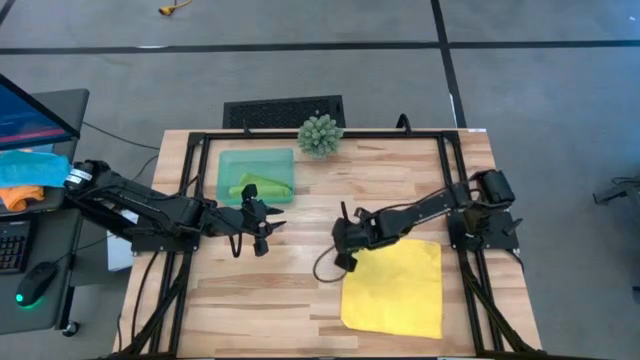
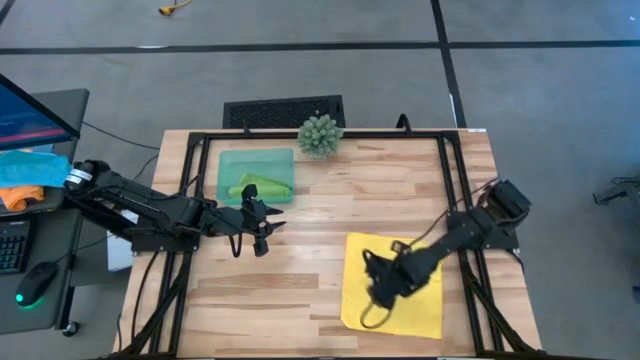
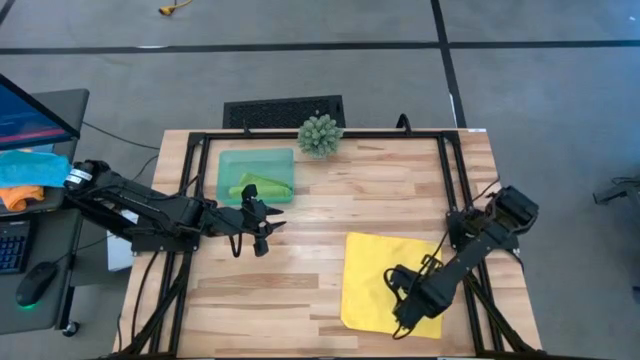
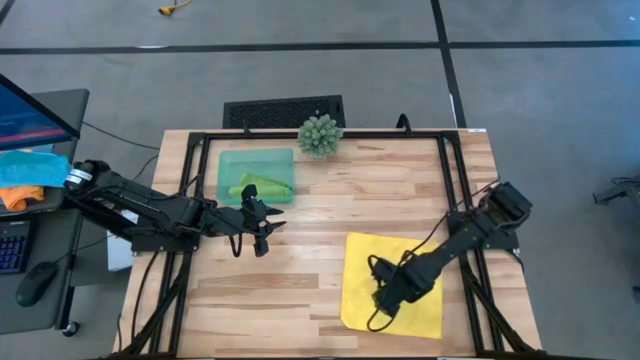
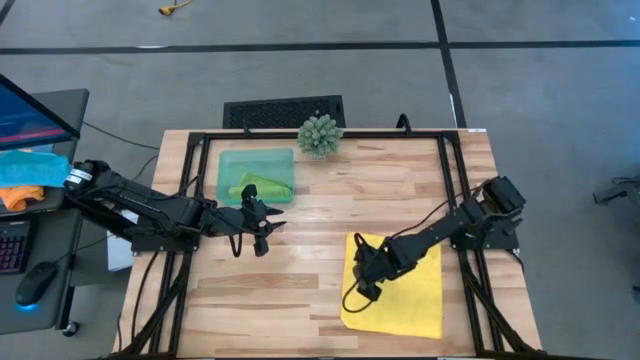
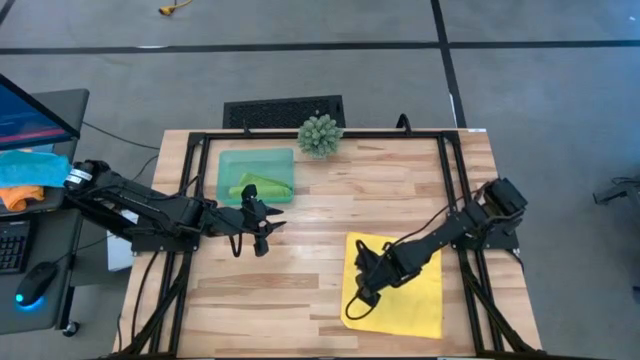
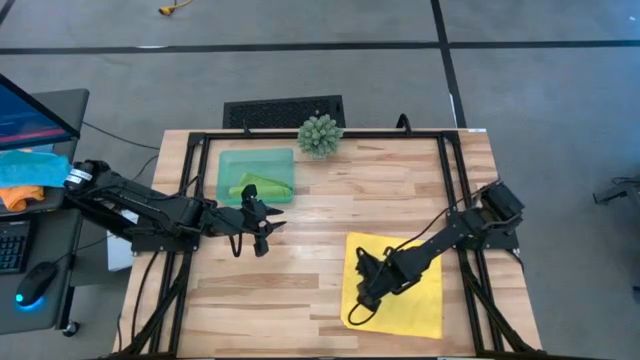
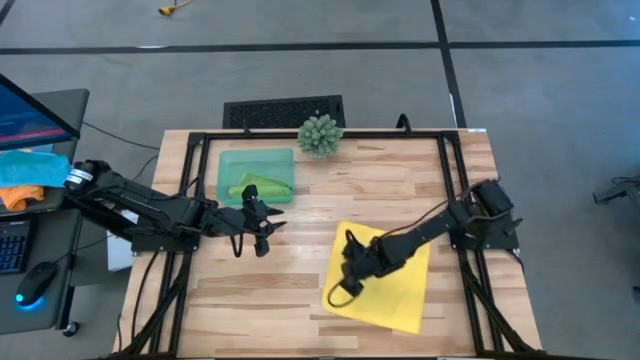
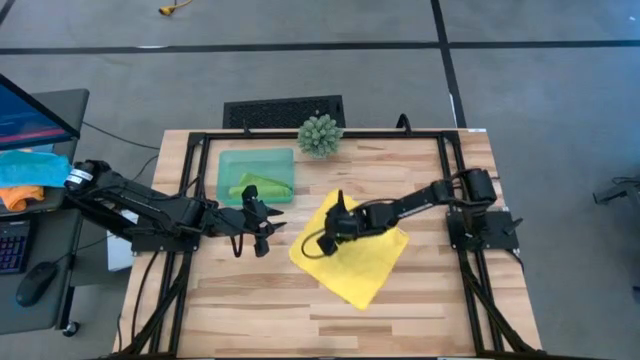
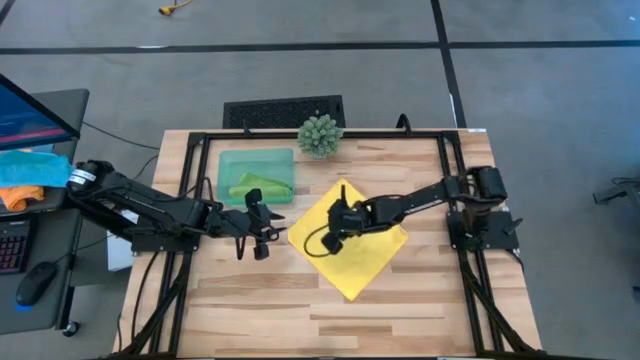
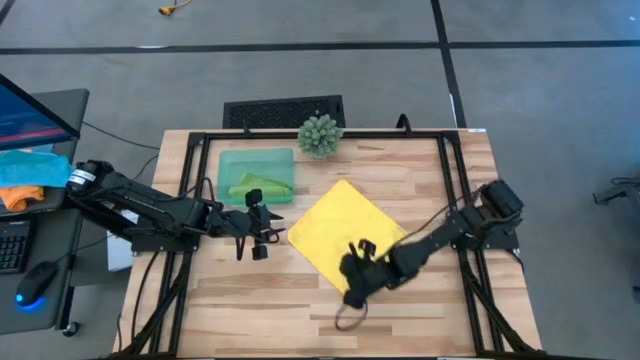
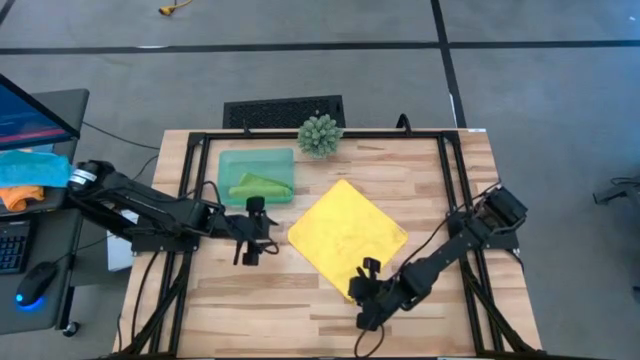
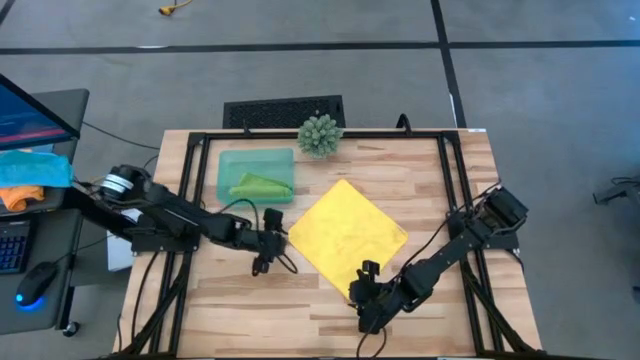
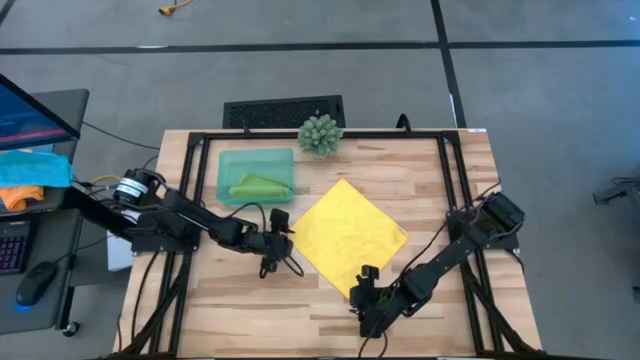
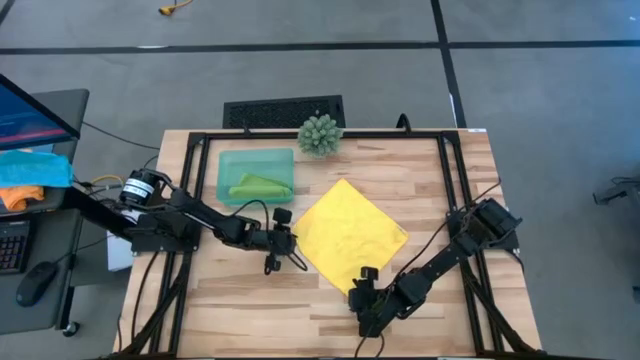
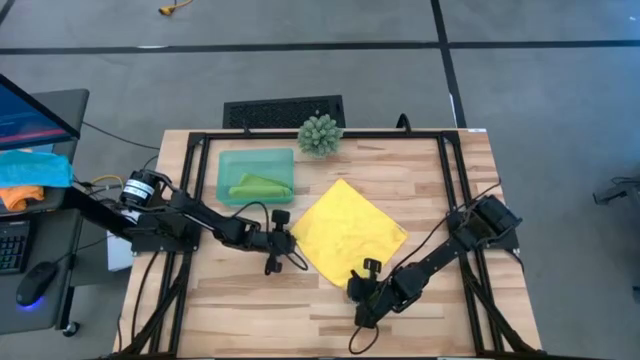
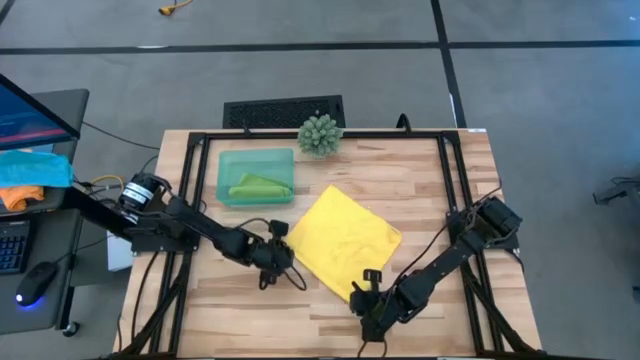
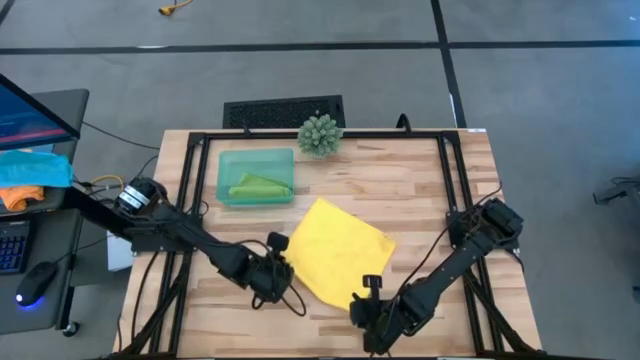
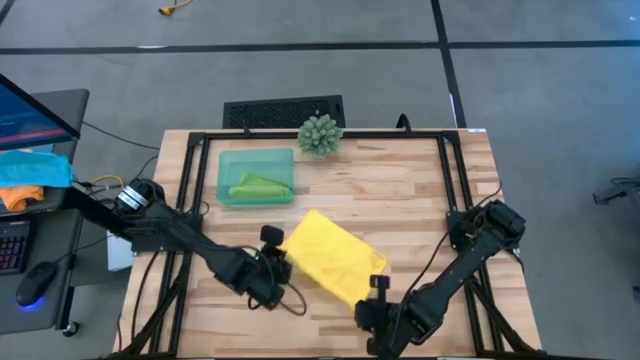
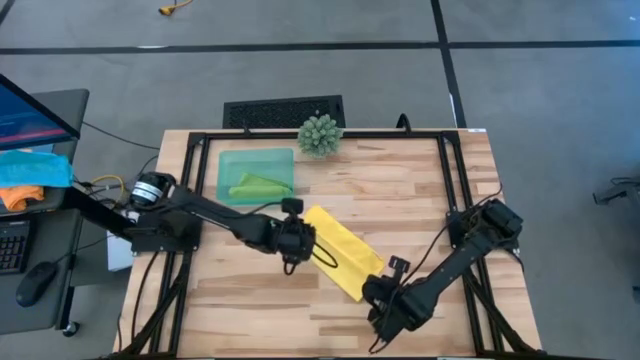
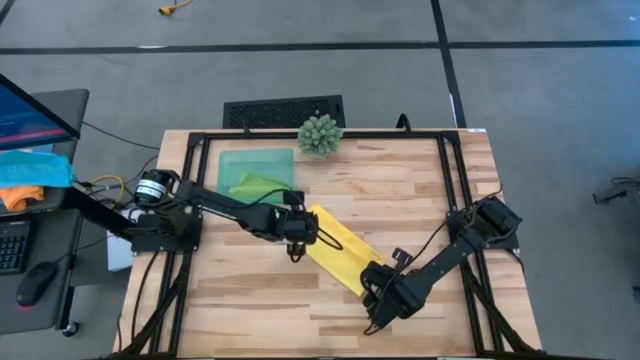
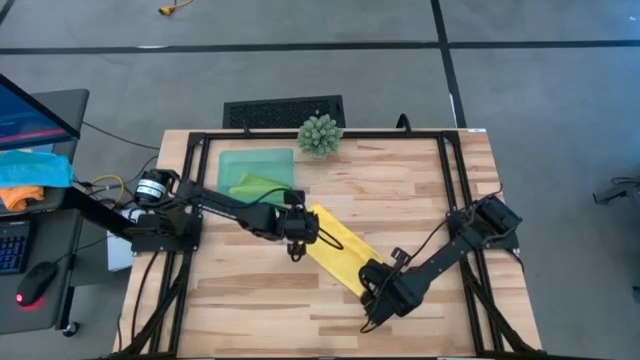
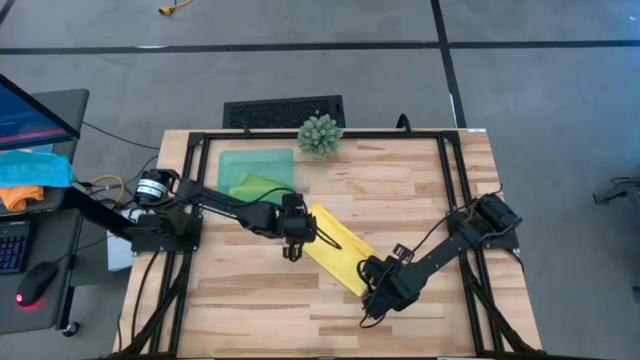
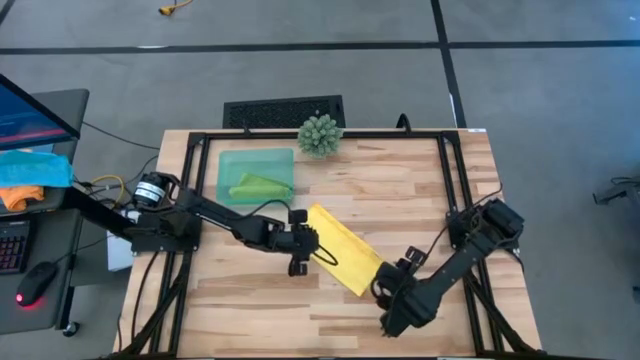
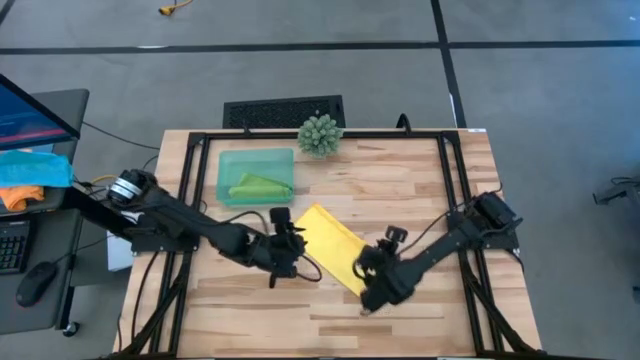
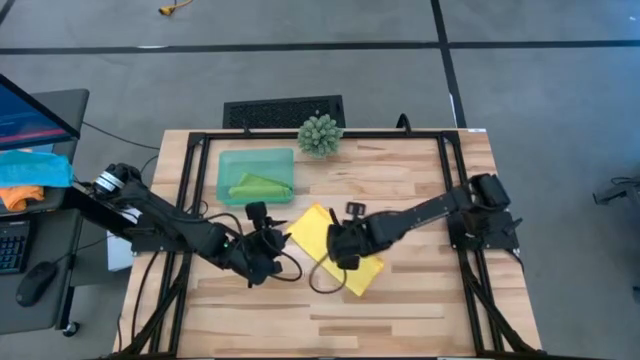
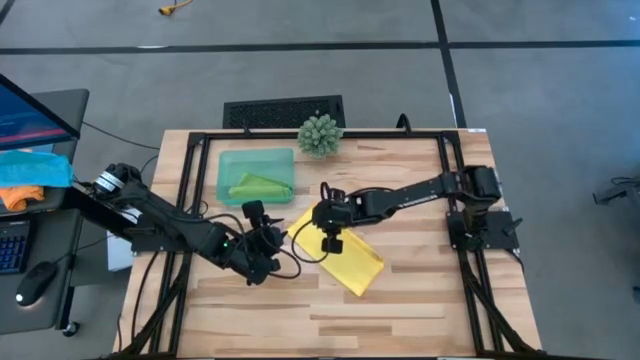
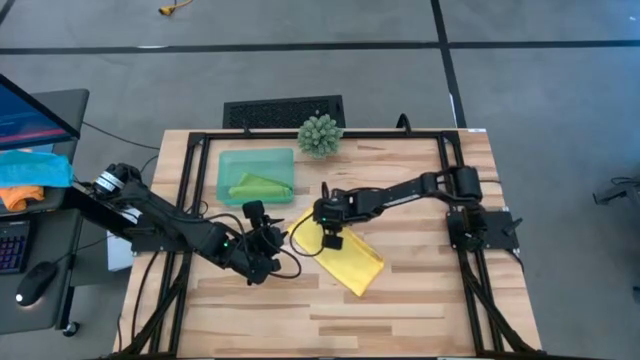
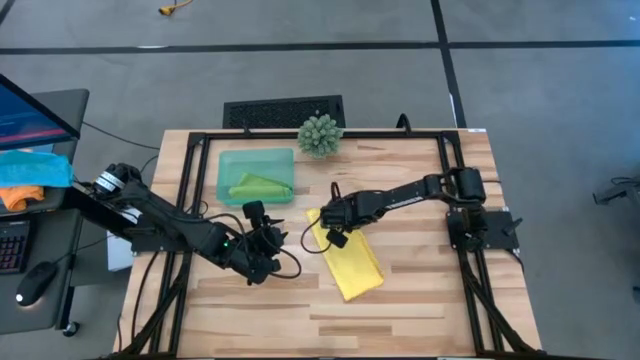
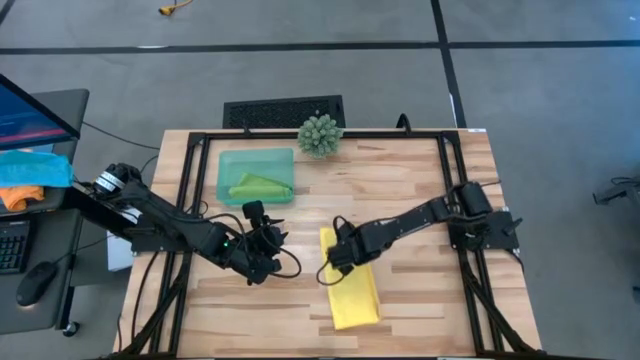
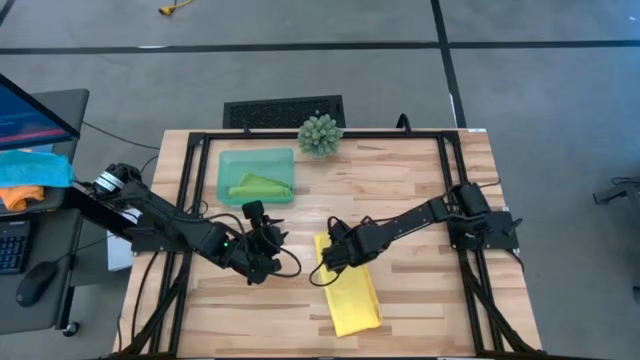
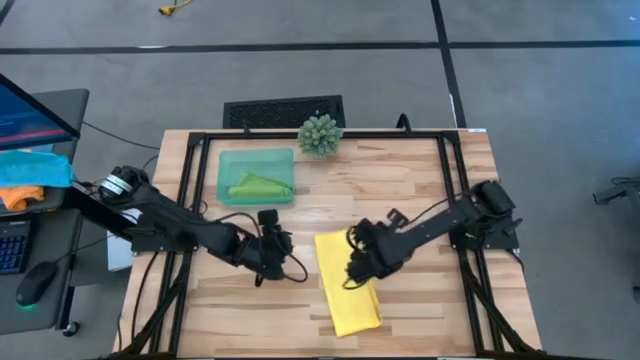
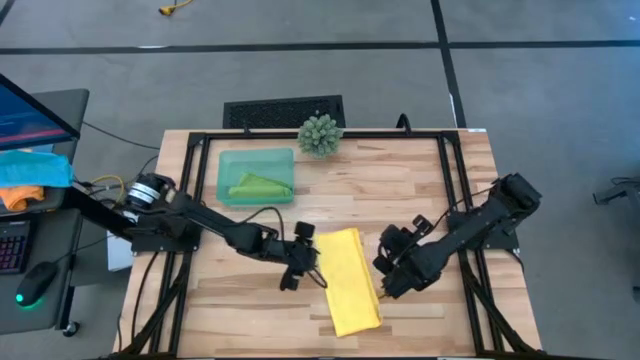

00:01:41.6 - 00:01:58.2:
Task: Roll microfiber towels into tight, uniform cylinder then place into a basket
Fold the yellow towel

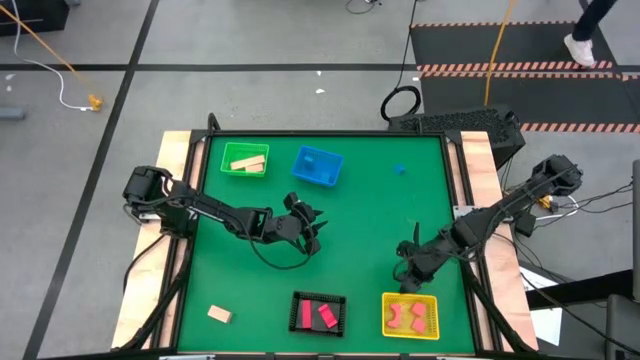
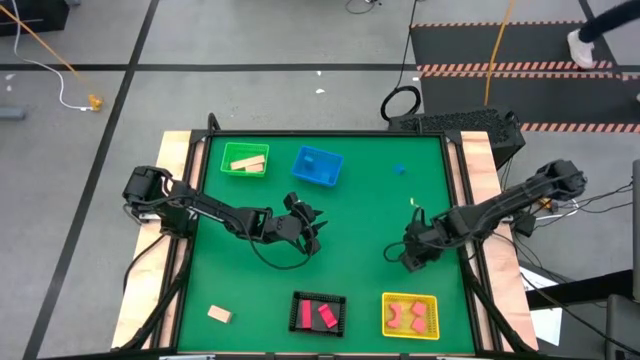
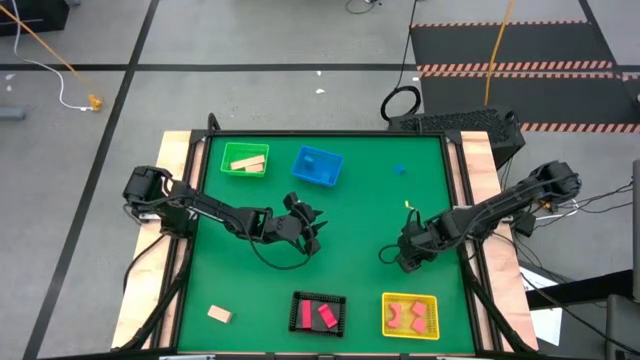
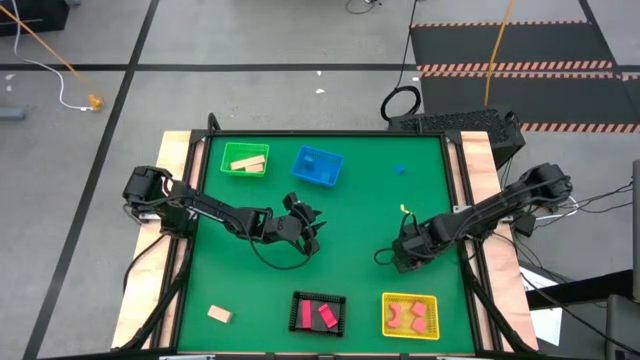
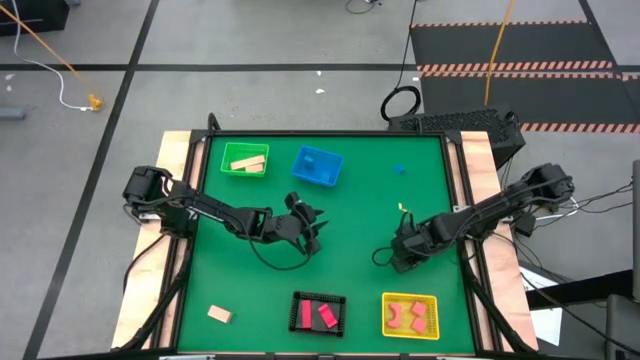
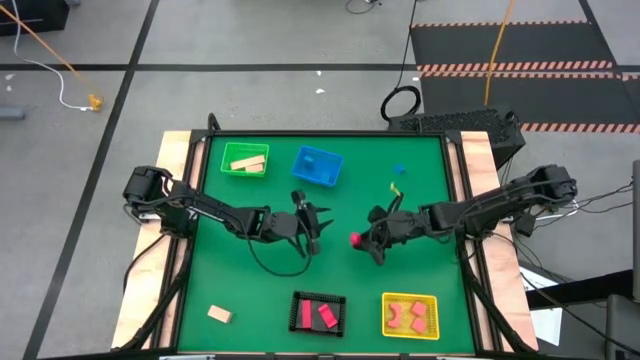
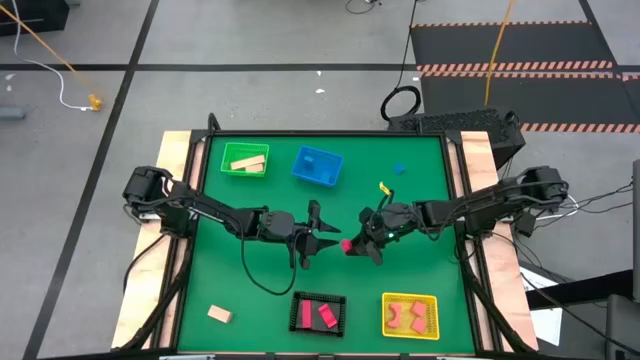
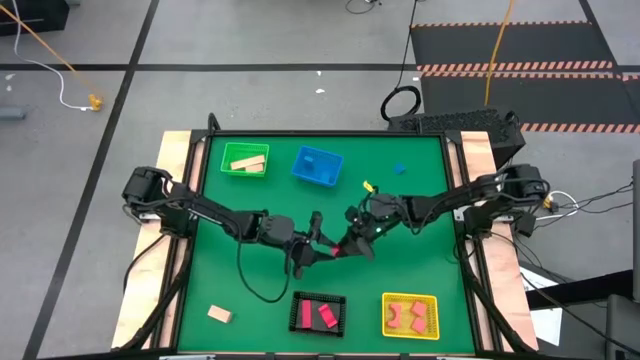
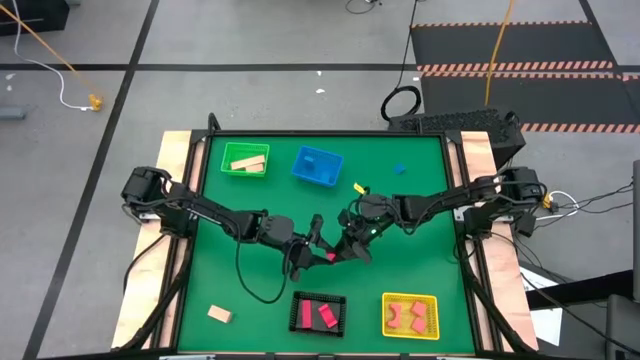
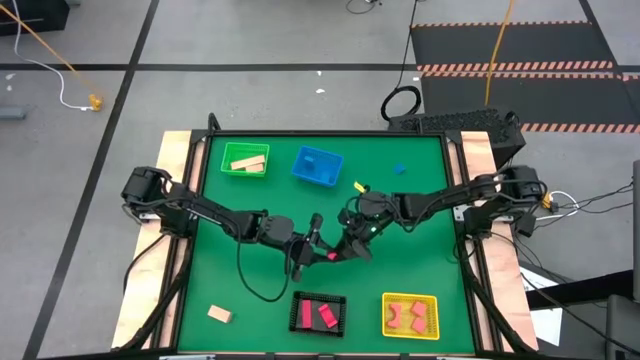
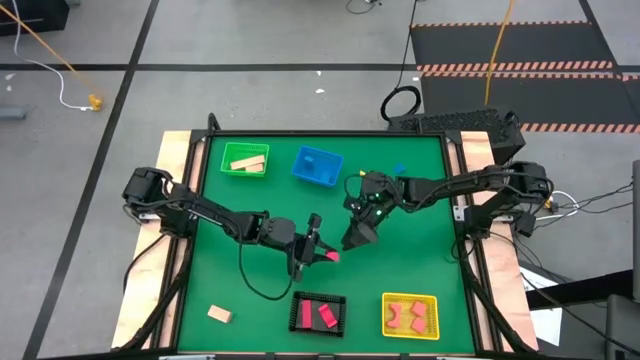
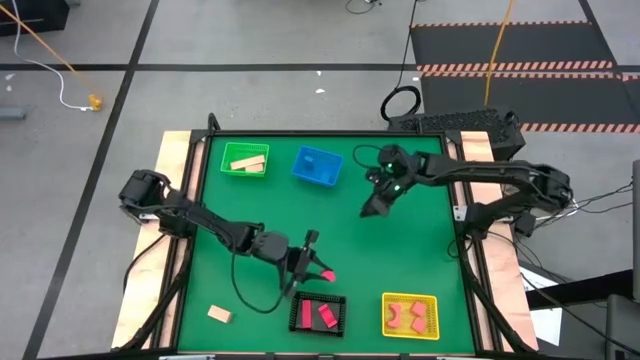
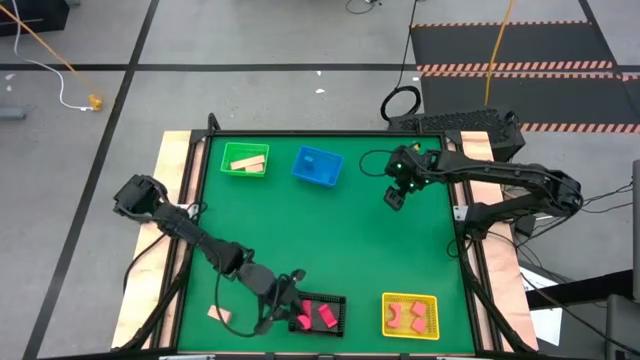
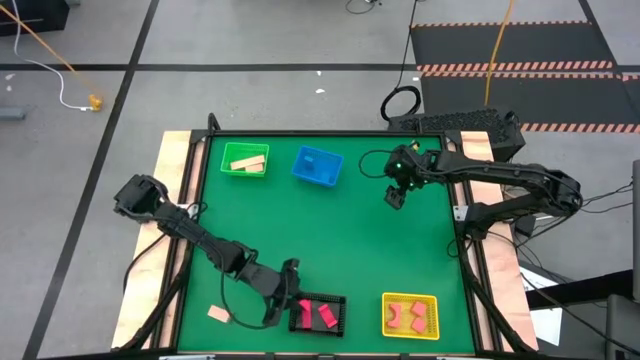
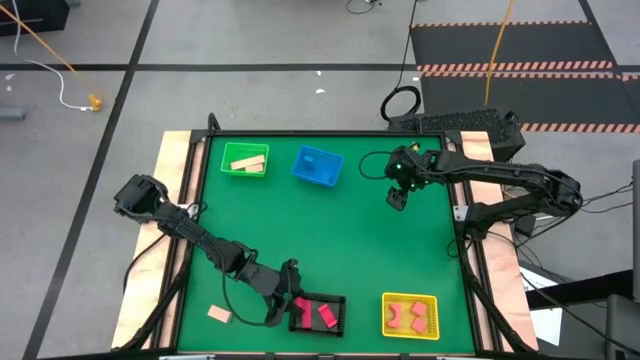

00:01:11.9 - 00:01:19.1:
Task: Sort & place blocks by color
Put the red wooden block into the black basket
